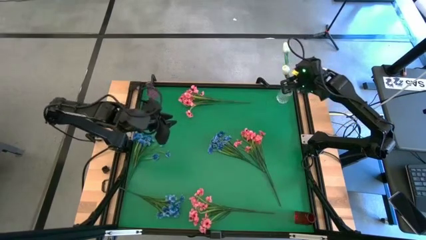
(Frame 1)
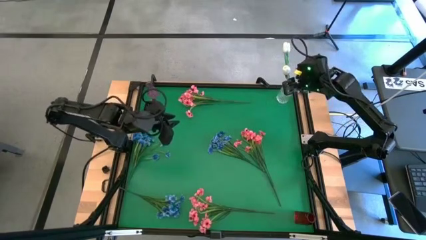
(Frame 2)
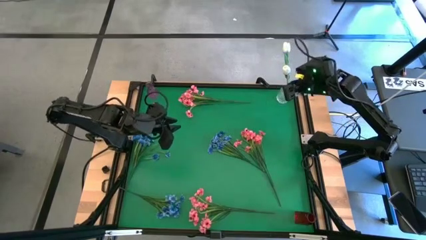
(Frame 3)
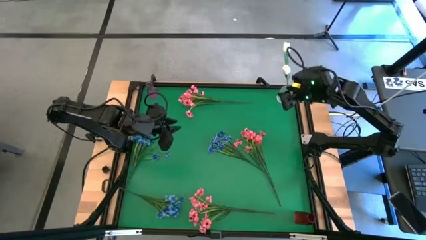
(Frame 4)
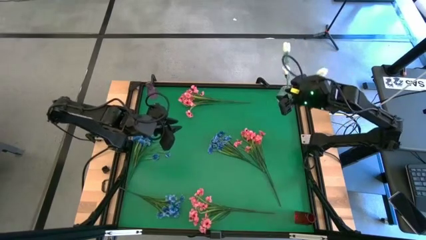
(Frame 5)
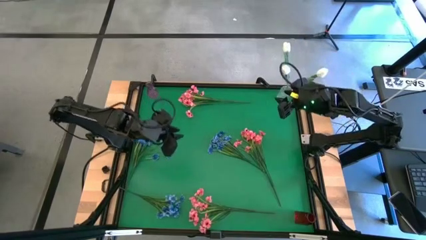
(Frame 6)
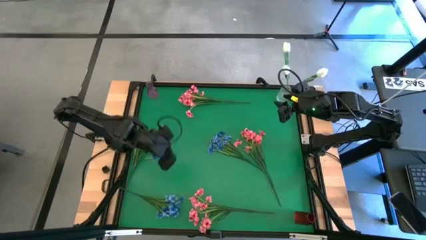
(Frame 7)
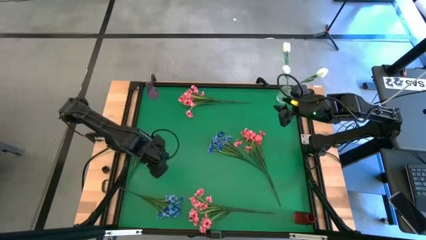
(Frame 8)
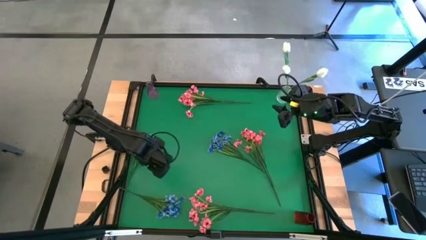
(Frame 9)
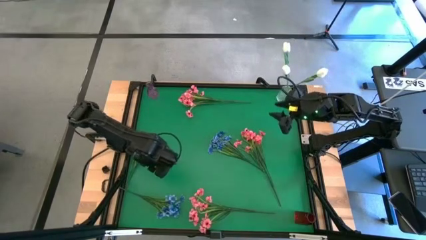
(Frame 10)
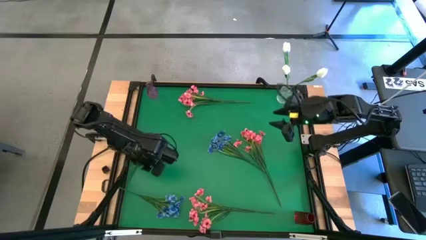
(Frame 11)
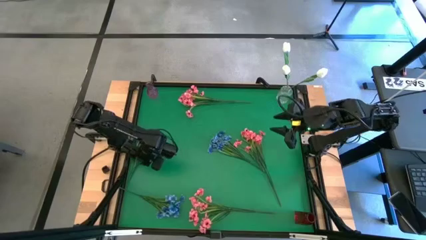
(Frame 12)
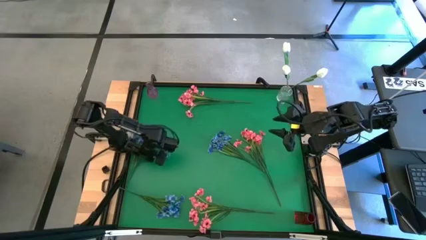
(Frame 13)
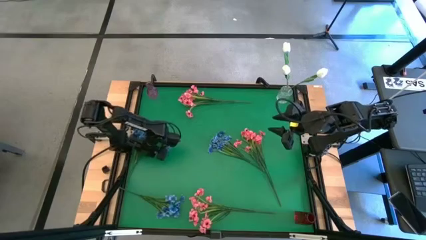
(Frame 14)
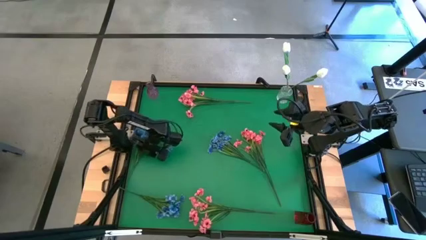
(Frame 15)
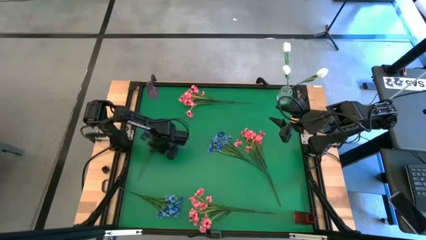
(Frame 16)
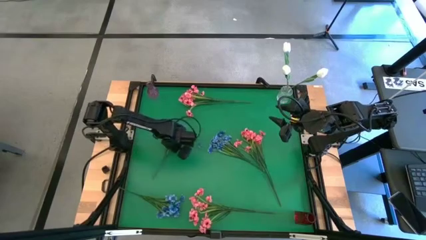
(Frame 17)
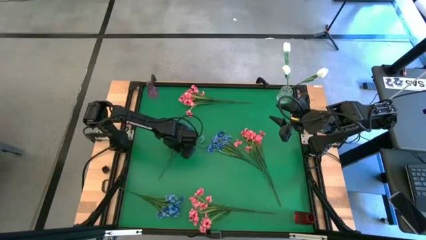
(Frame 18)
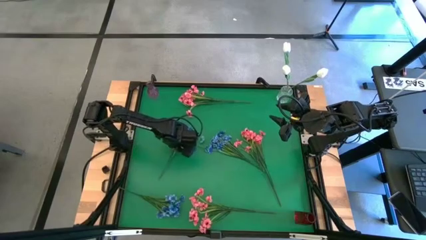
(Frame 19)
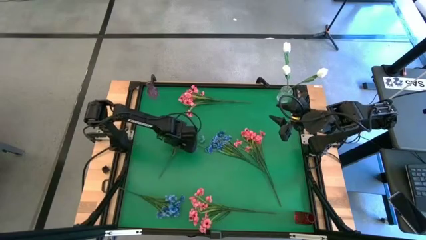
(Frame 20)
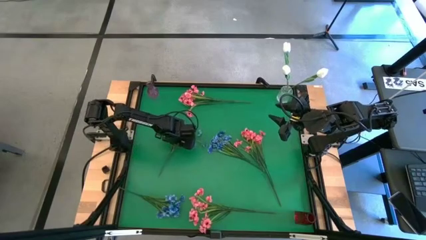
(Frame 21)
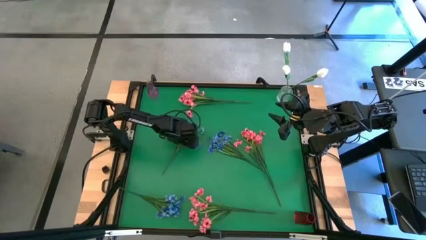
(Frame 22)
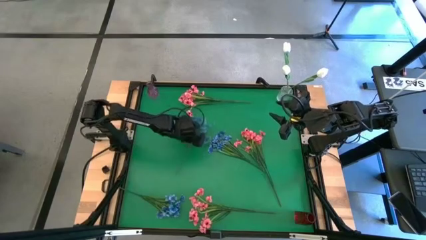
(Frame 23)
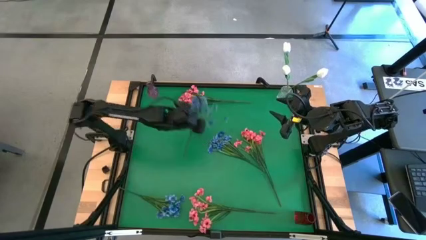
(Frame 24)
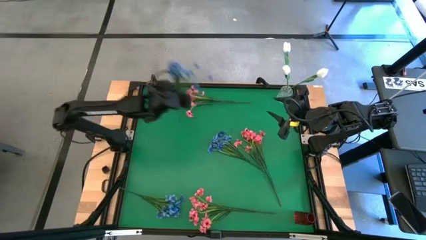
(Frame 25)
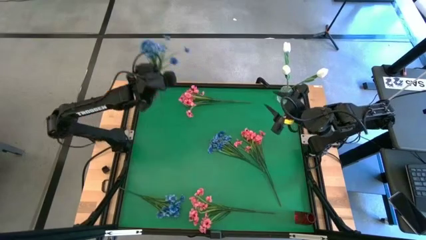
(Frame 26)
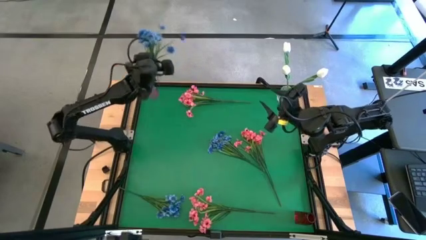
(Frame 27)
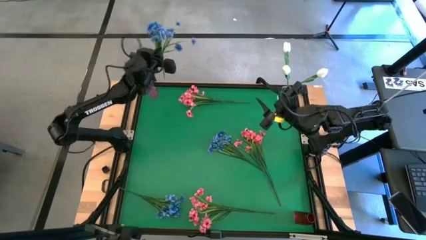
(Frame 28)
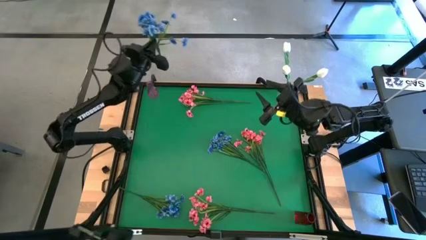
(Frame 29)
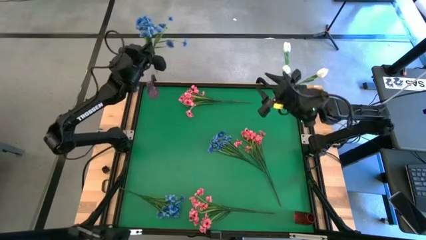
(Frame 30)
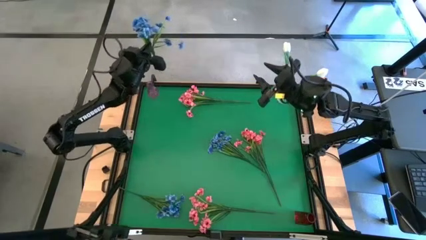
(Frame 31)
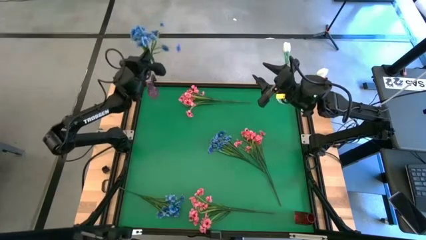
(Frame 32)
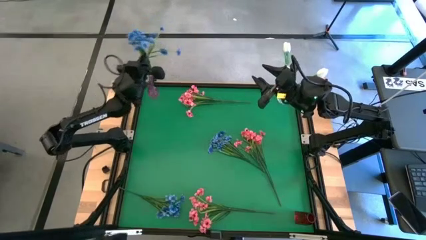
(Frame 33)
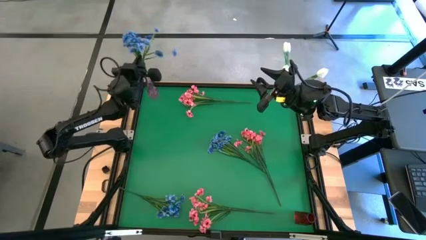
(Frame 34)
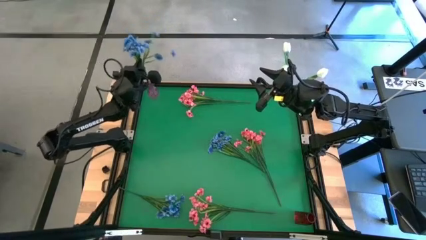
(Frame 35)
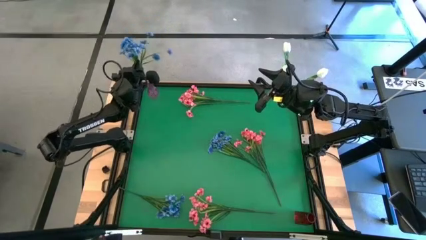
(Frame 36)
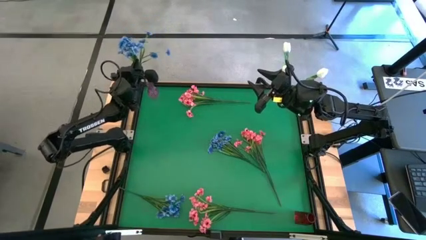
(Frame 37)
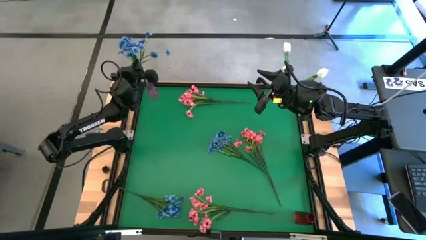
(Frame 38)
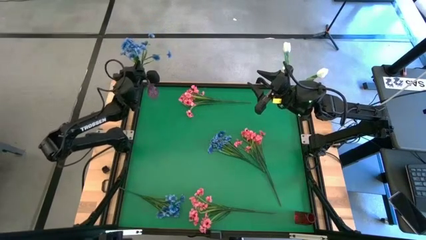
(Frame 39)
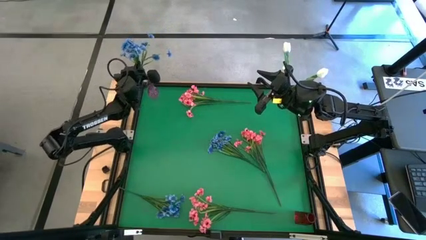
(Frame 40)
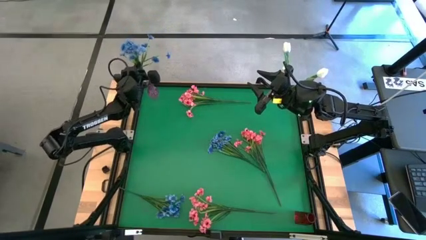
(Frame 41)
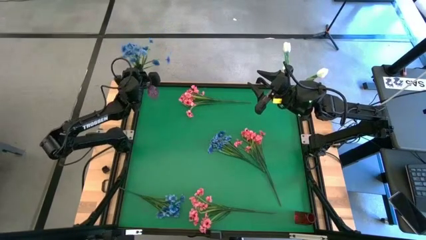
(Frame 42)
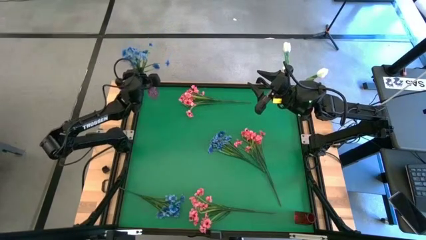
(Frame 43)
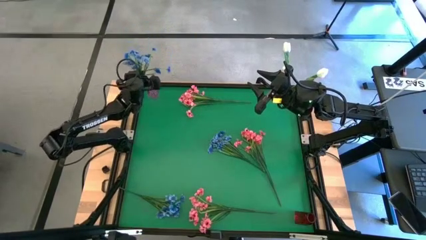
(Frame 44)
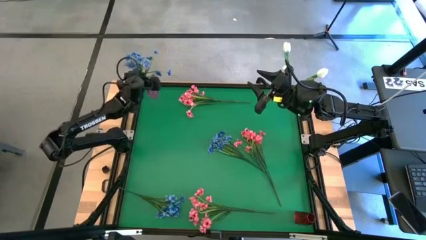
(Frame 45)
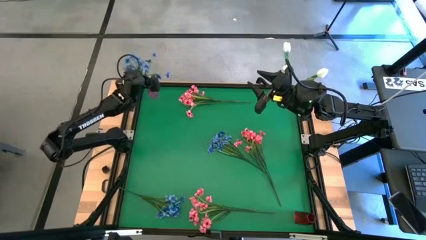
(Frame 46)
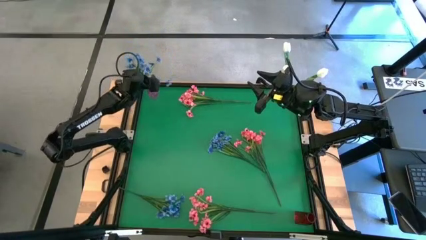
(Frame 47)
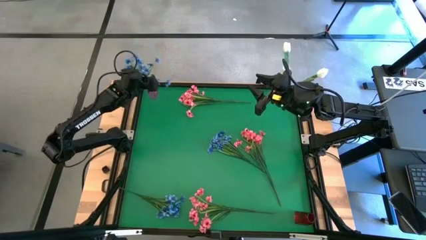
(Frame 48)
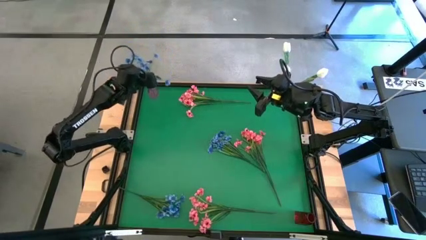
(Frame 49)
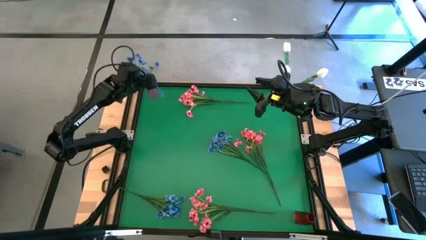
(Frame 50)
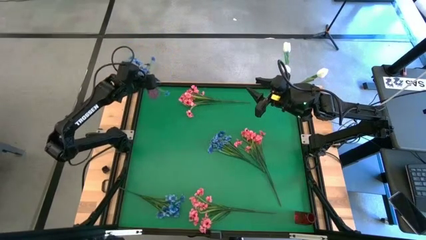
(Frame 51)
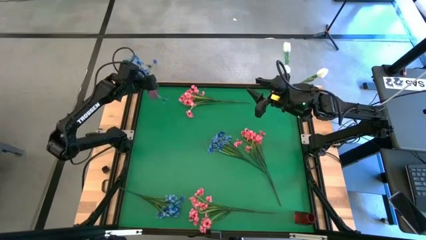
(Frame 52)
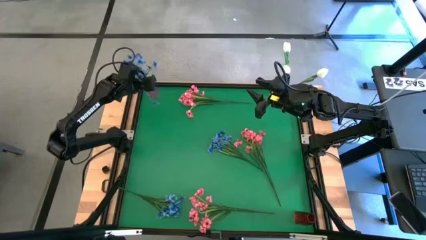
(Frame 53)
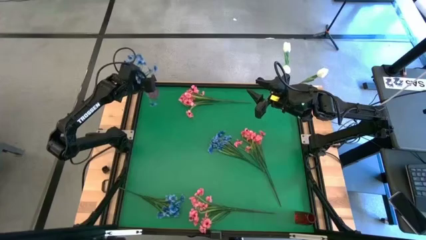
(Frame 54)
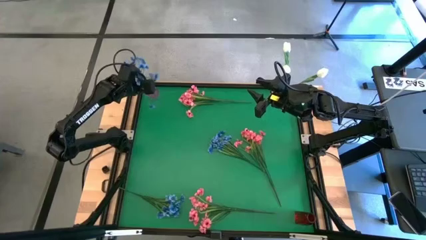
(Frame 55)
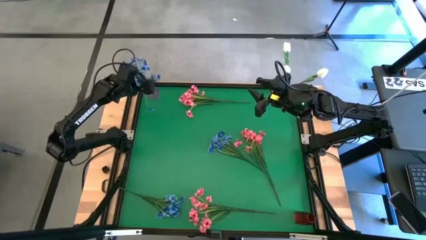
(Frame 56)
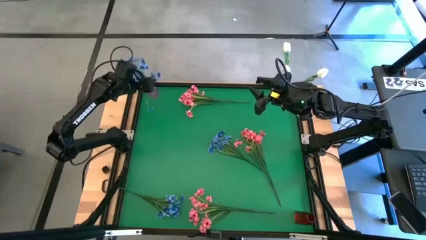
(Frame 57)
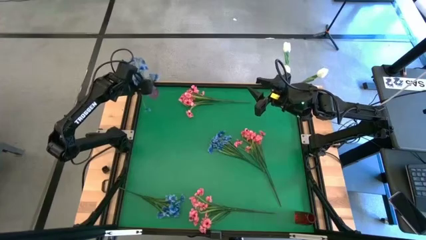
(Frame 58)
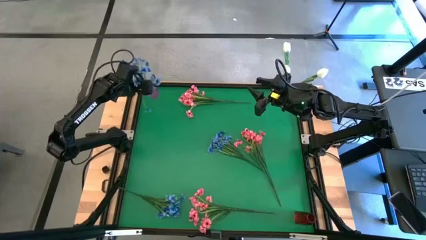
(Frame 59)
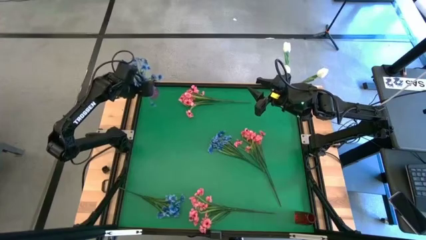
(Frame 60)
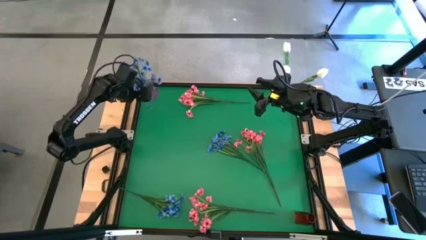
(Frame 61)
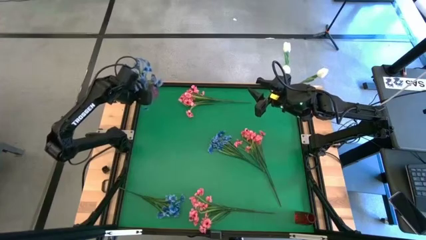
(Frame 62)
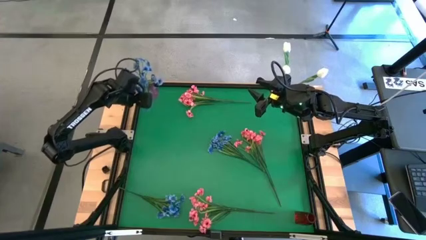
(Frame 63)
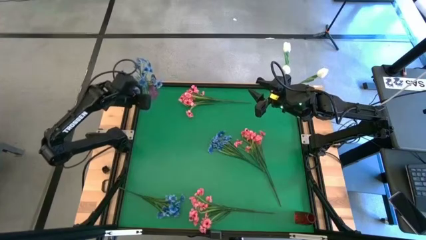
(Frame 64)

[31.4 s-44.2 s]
Task: Sort flowers into vase by color
Put the top left blue flowers into the violet vase

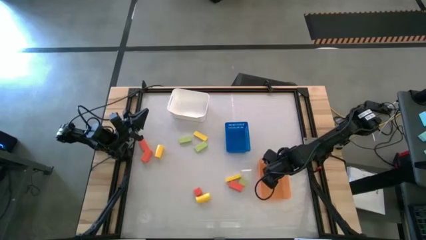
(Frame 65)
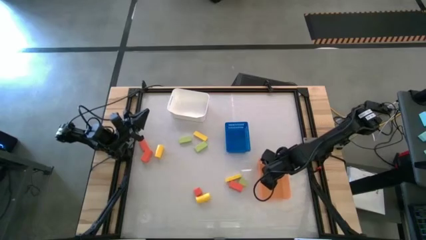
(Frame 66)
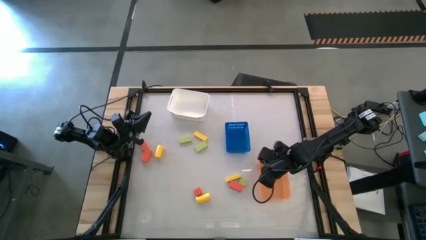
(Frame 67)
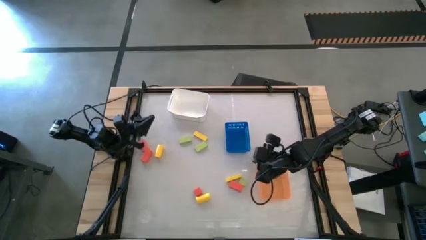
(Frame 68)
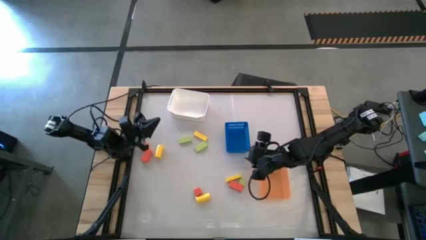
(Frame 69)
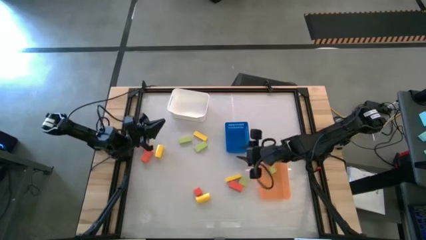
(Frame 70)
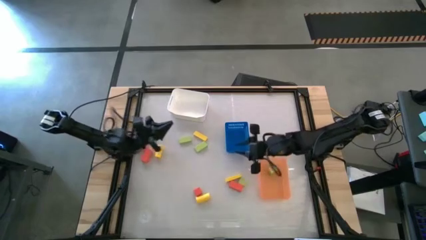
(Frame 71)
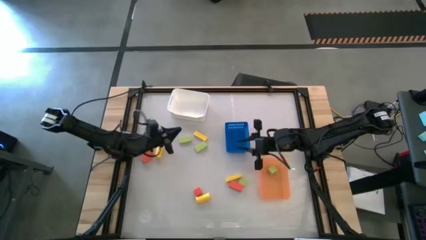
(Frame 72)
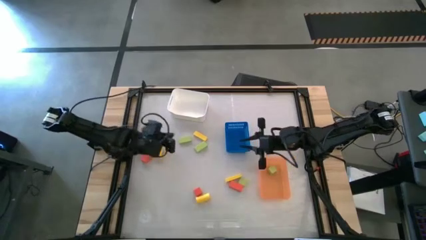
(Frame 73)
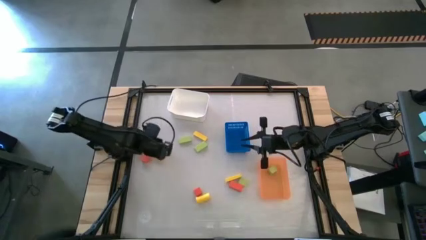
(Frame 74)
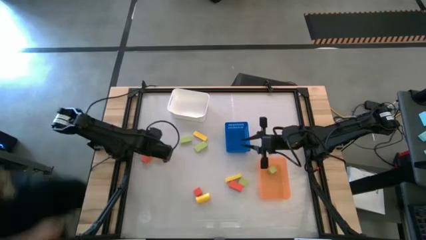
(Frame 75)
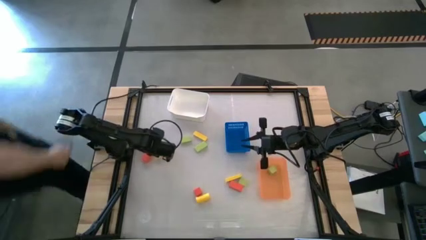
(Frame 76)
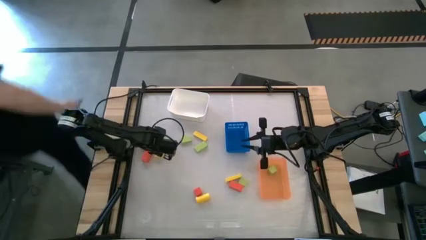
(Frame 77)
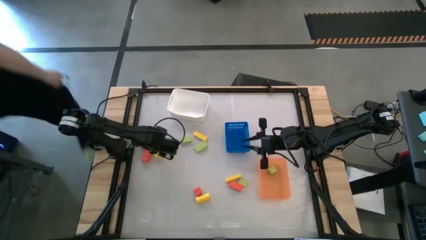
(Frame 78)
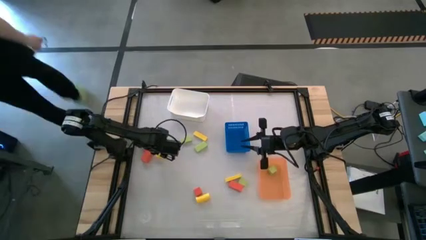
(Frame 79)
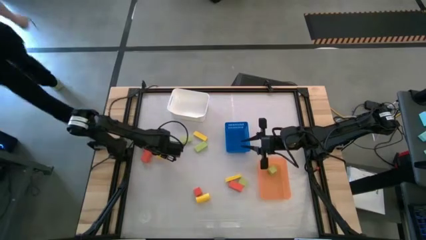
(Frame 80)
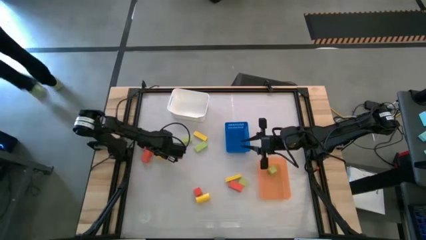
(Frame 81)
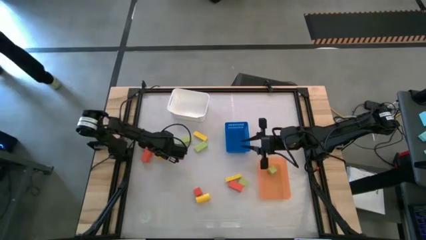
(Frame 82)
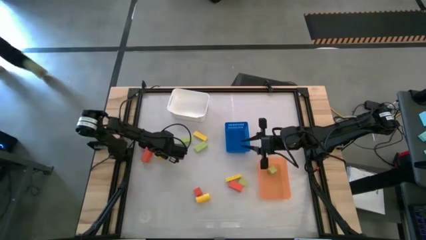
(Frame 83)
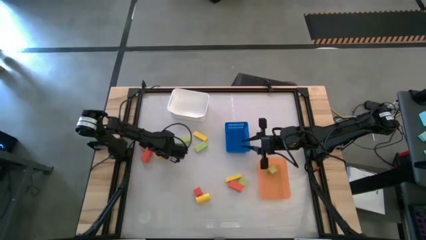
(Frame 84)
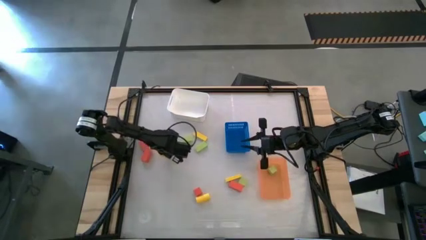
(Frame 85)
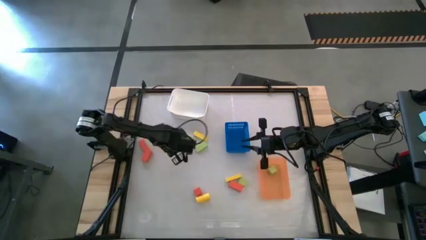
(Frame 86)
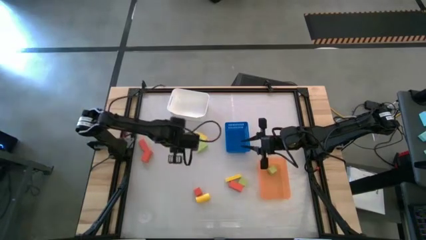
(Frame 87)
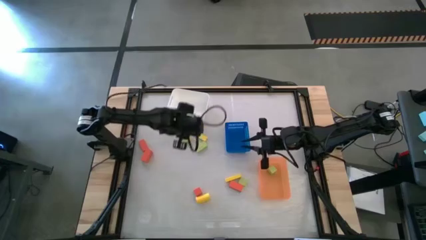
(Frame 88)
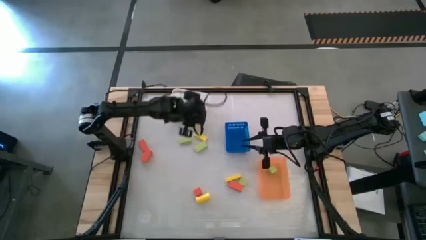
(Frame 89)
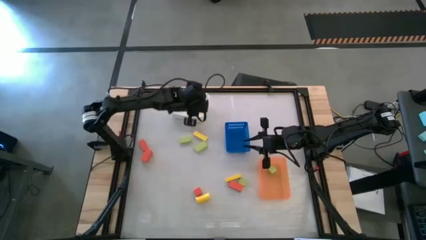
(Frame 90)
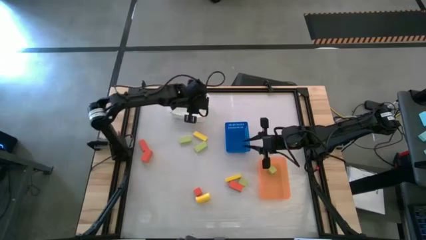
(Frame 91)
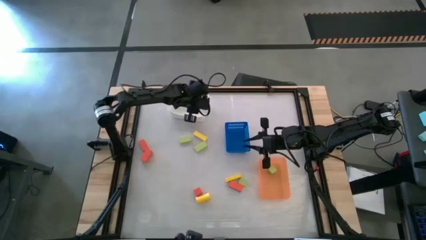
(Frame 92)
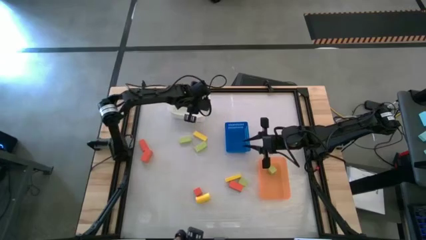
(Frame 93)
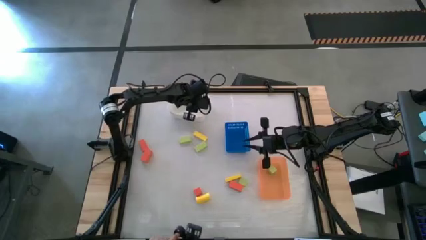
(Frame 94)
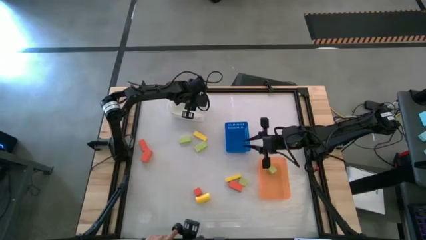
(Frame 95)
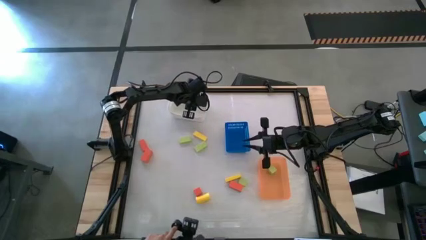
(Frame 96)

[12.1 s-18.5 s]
Task: Sort & place blocks by color
Put the yellow block into the white bin
